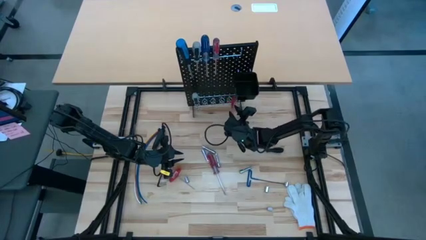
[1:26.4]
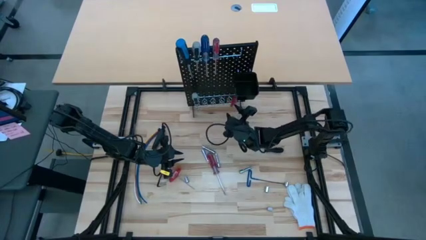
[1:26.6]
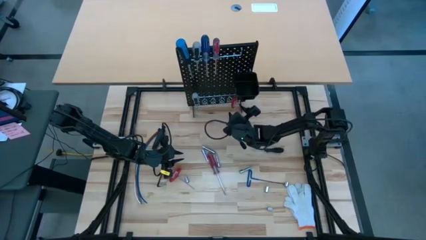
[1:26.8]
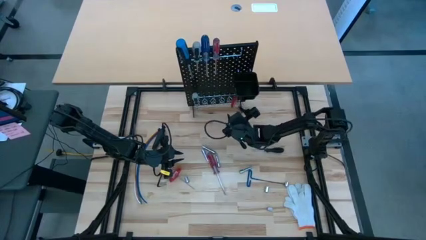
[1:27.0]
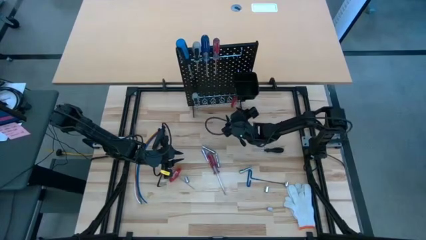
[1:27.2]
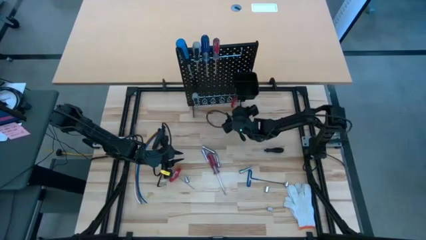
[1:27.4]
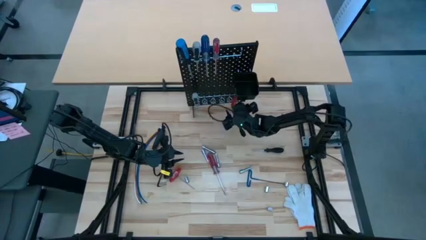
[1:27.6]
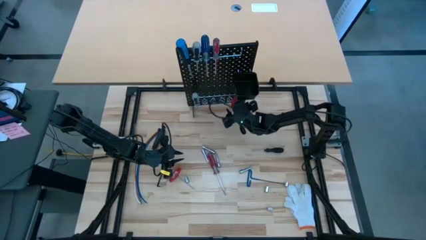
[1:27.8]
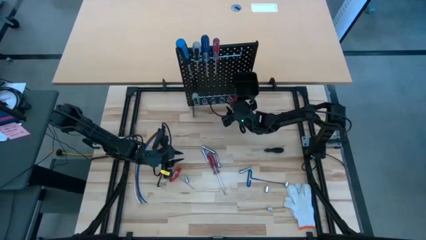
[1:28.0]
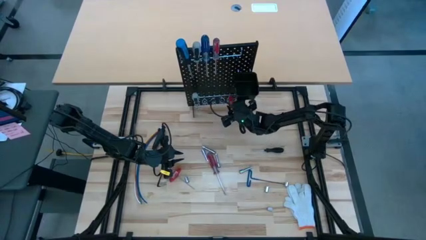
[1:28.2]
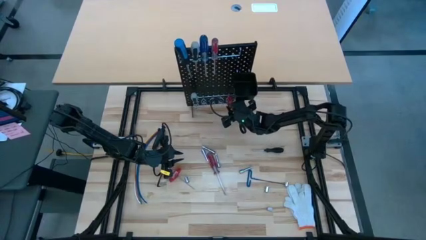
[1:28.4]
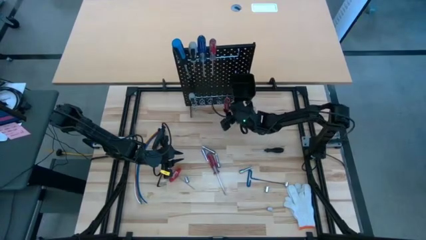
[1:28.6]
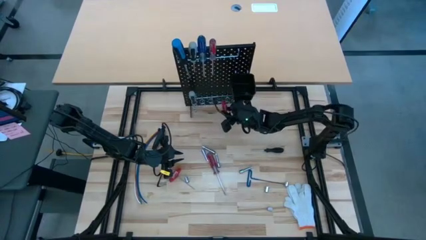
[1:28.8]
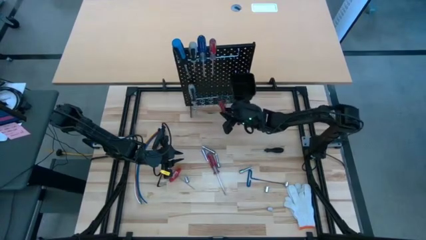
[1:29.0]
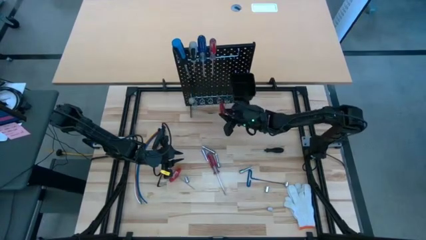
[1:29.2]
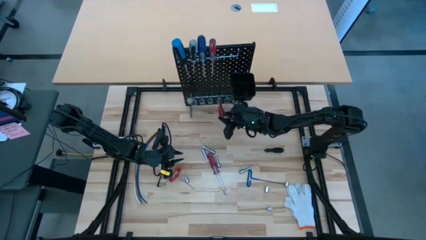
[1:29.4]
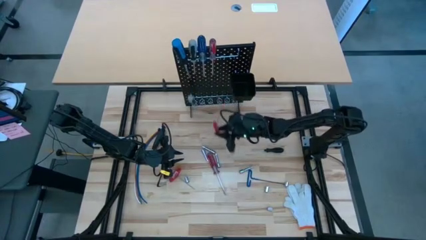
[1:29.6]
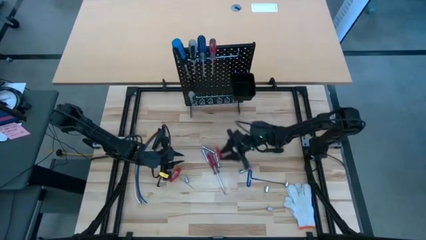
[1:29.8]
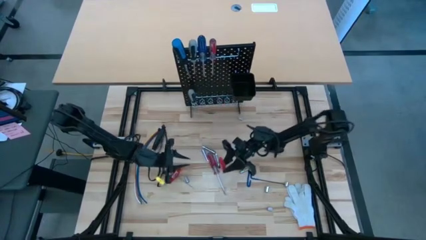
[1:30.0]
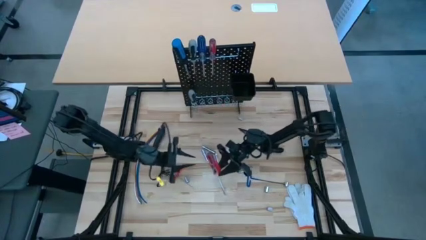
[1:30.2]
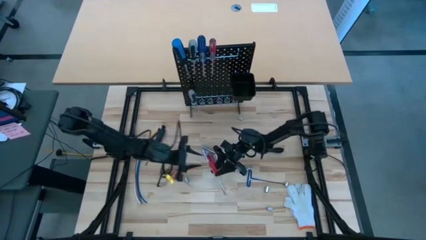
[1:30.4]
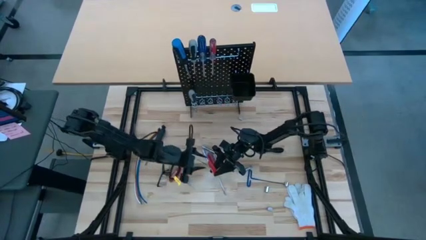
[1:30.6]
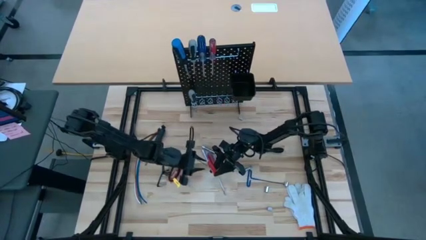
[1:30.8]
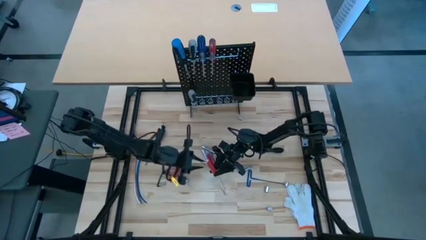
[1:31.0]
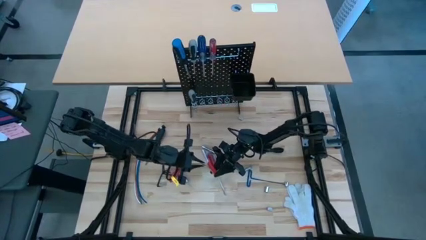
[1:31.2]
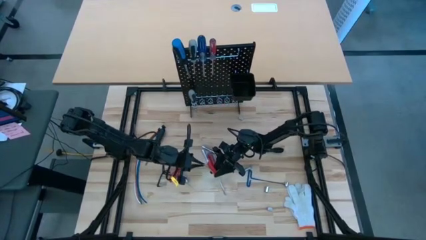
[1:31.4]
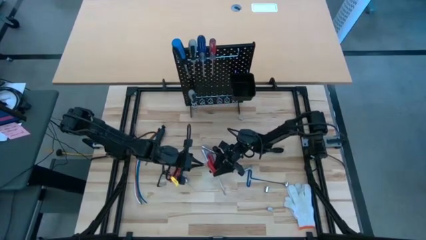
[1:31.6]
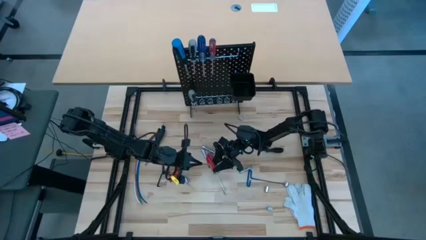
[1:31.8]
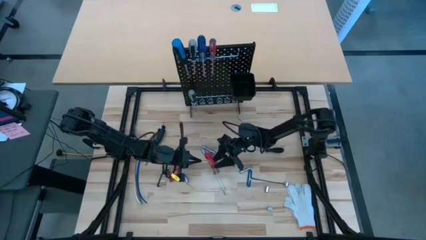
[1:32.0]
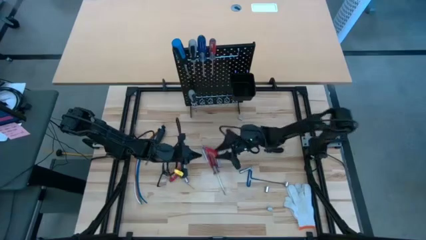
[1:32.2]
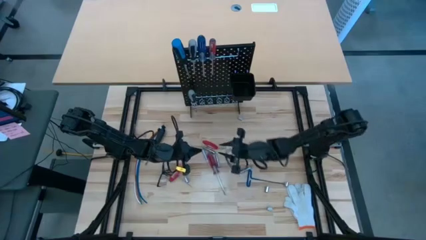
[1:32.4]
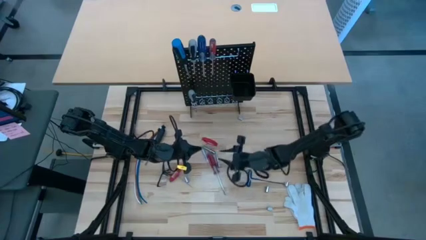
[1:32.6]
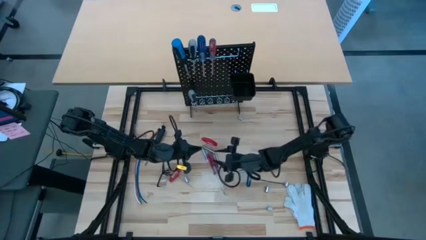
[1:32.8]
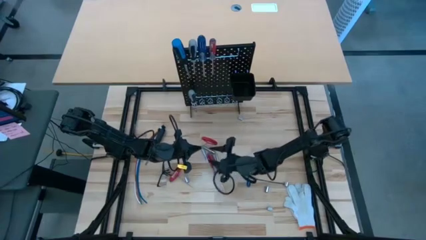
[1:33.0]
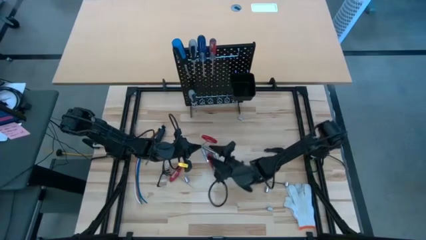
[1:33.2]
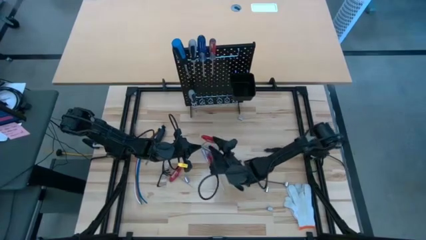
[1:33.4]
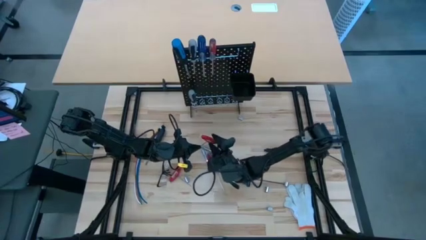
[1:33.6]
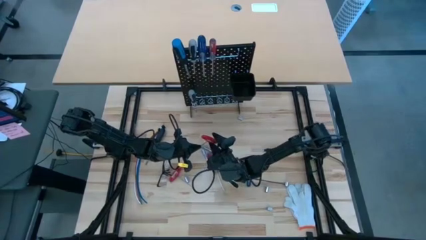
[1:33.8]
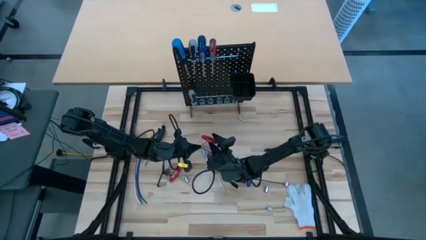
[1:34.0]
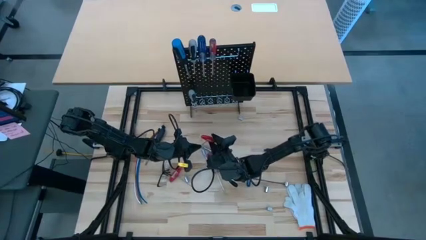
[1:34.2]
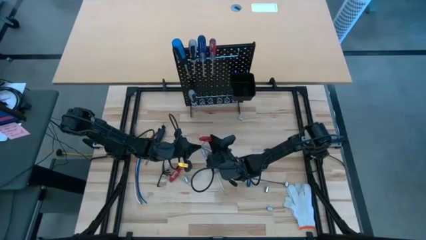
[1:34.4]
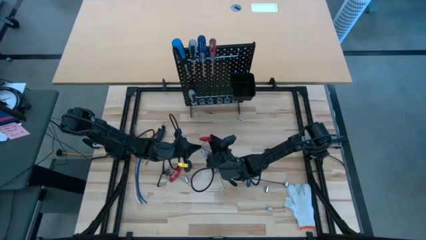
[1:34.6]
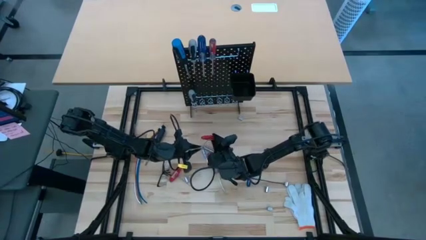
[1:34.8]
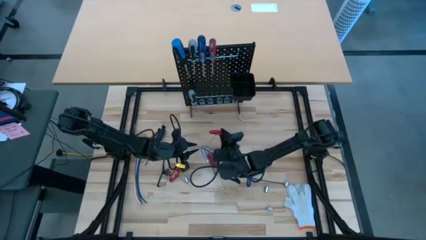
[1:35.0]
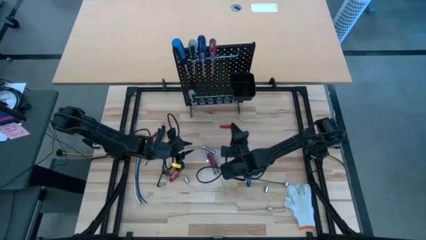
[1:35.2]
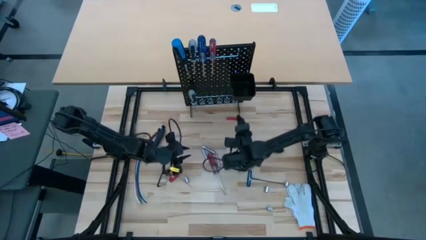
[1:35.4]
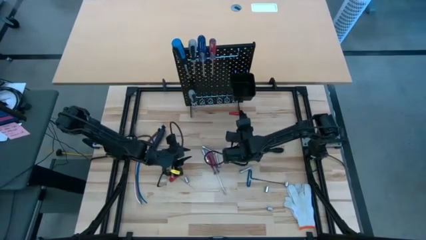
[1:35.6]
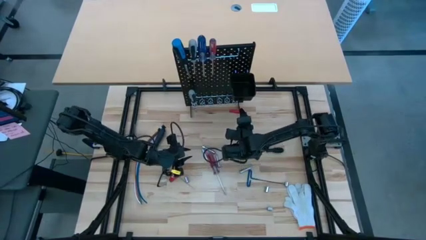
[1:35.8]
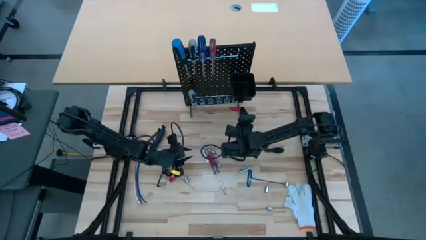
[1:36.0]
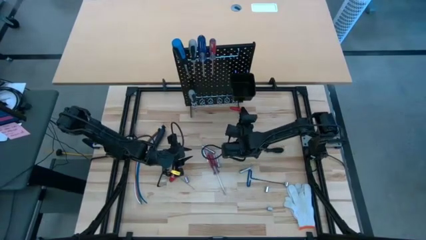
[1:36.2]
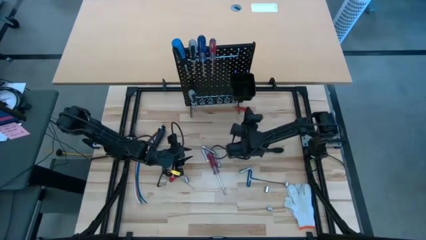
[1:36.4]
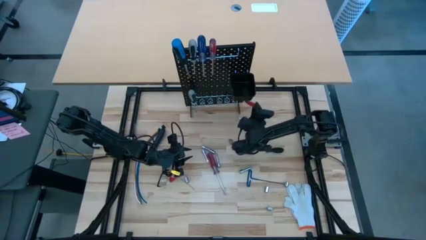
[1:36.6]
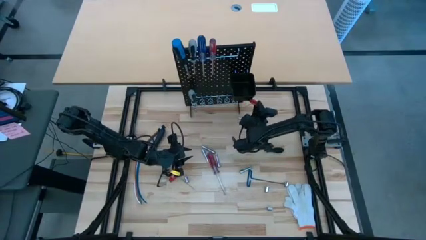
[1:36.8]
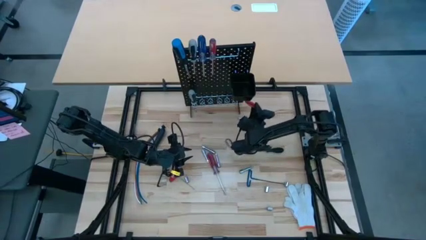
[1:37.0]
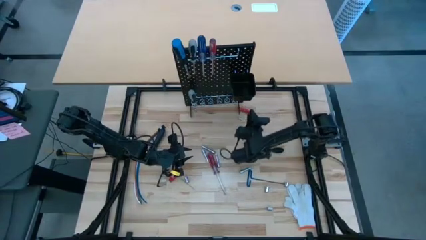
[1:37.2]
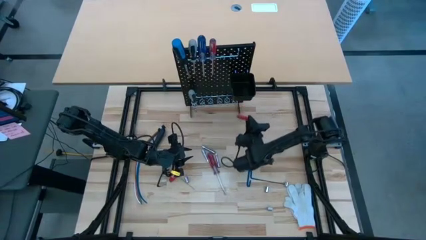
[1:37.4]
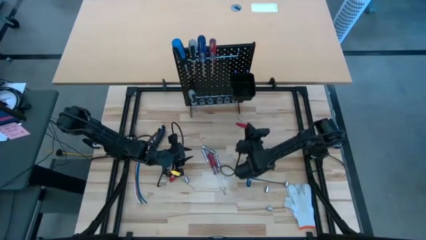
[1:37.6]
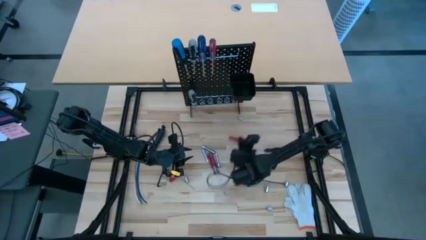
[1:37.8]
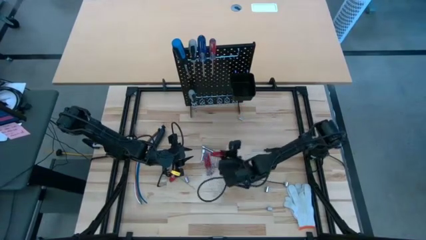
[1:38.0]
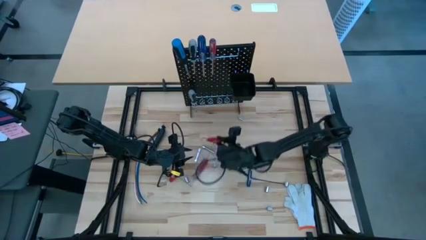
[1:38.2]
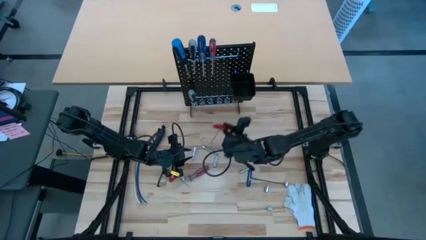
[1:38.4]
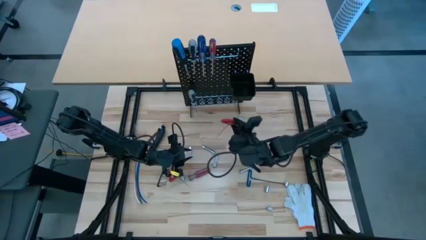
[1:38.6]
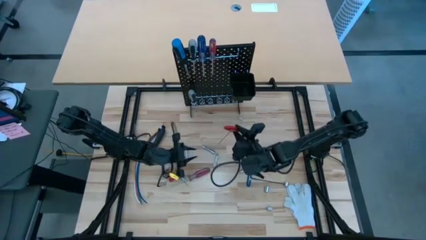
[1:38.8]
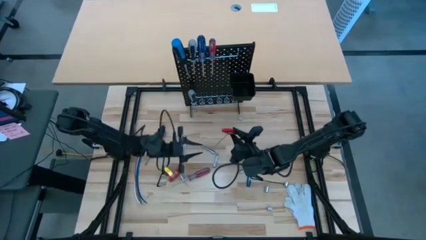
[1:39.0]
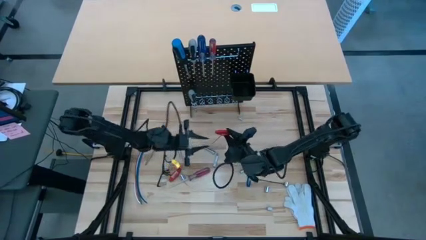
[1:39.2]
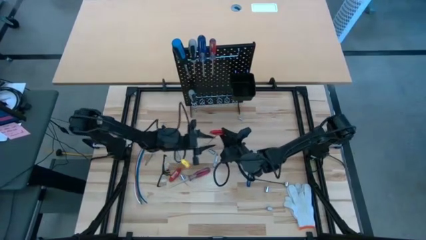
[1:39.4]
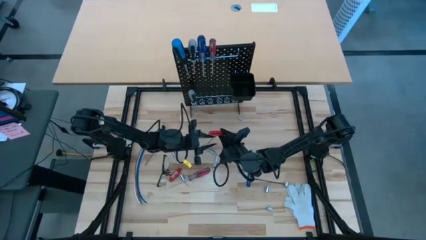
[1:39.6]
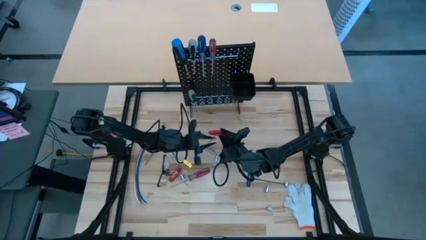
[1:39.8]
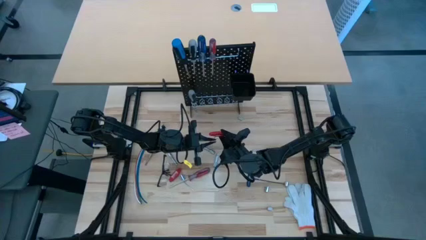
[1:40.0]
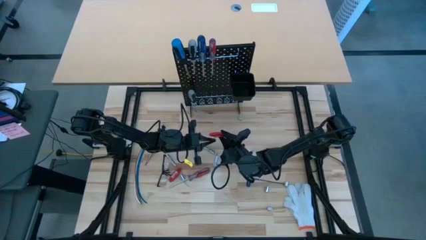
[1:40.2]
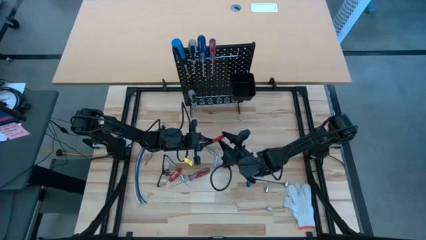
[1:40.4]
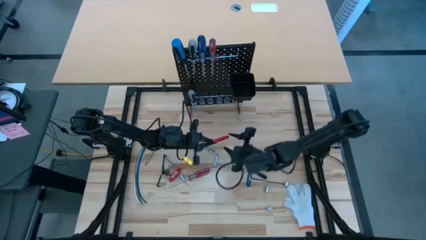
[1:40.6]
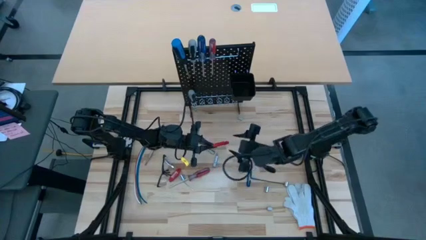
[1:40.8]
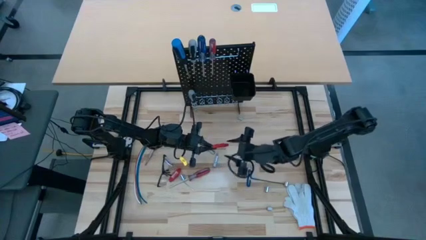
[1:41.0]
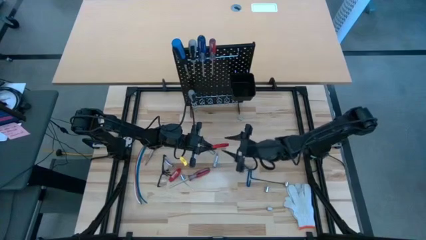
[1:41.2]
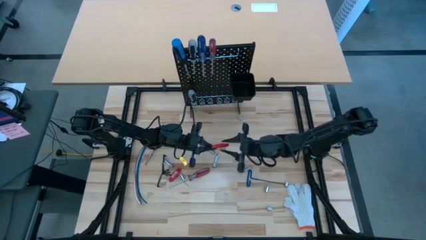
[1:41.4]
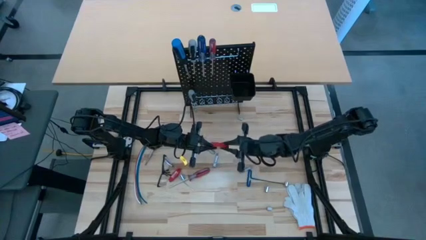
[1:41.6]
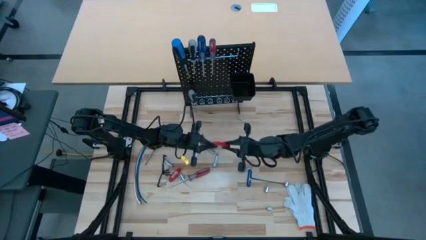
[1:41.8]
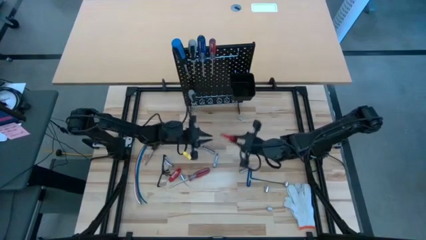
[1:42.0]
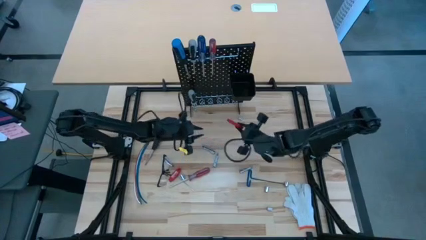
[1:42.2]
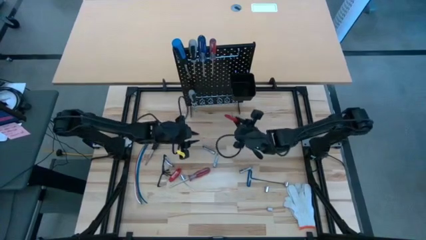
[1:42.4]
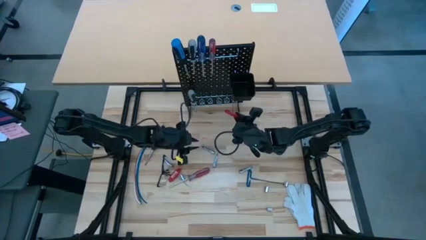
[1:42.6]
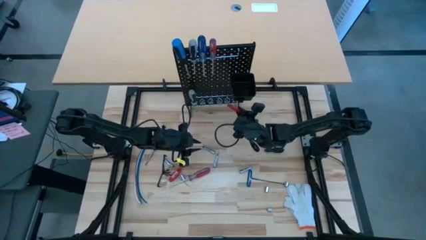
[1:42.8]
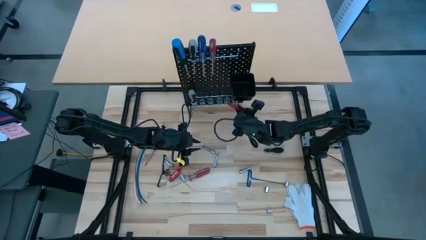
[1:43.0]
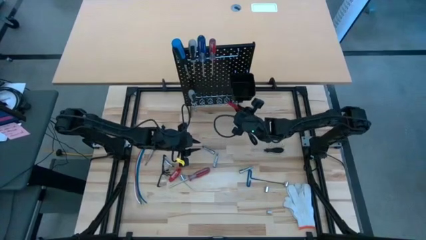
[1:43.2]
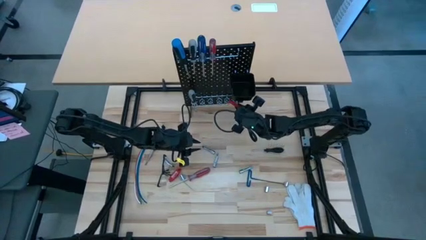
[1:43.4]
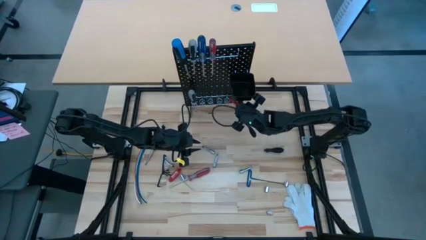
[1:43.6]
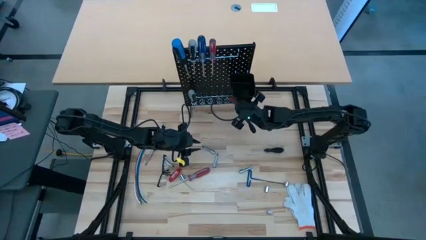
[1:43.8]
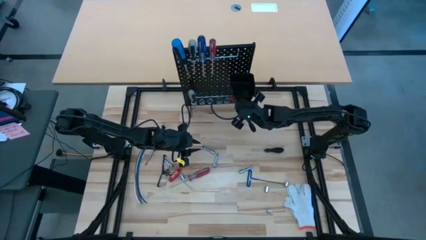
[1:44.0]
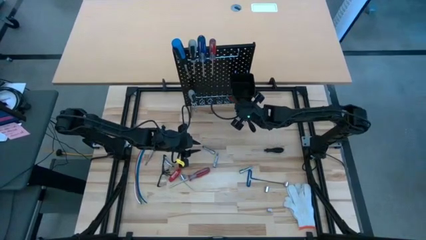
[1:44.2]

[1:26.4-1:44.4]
Task: Hang tools onto peg board
Hang the allen wrench on the pegboard
